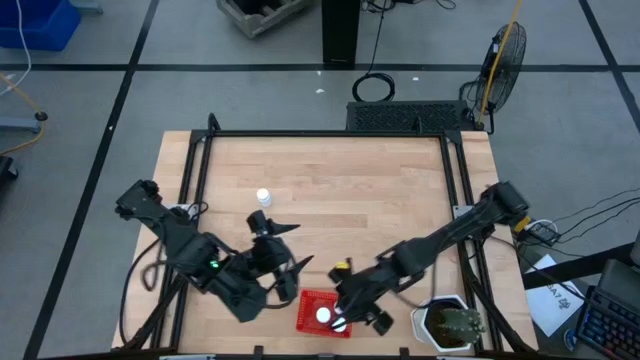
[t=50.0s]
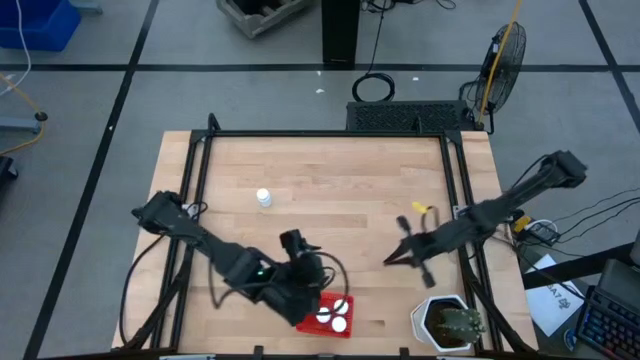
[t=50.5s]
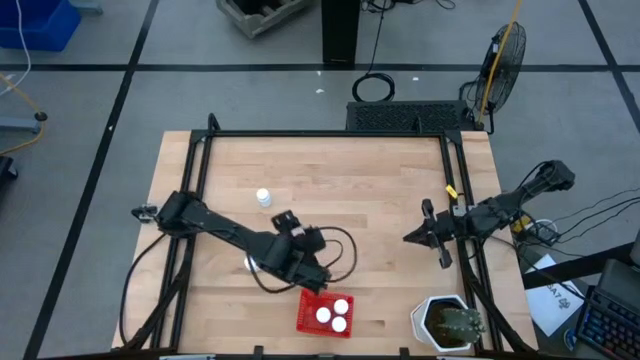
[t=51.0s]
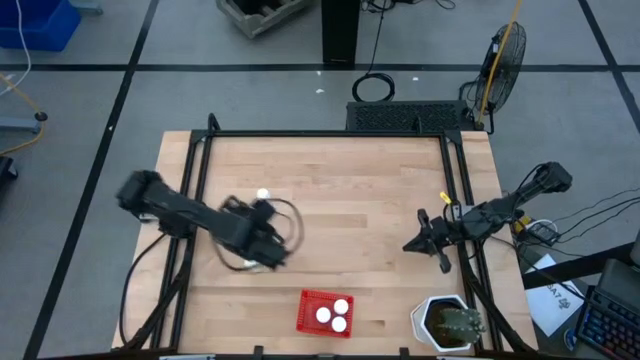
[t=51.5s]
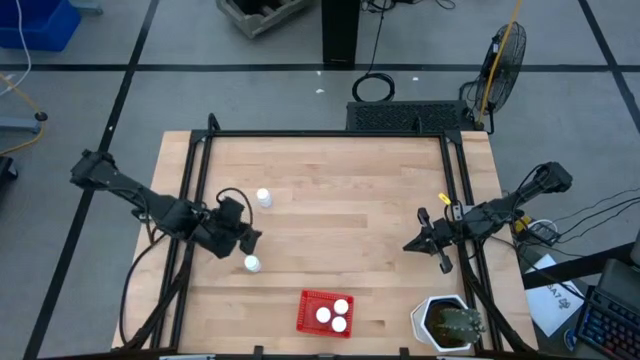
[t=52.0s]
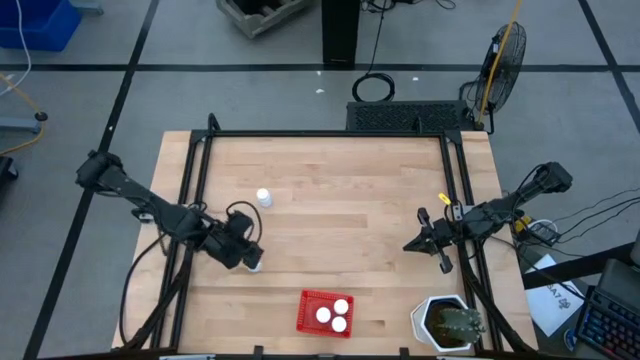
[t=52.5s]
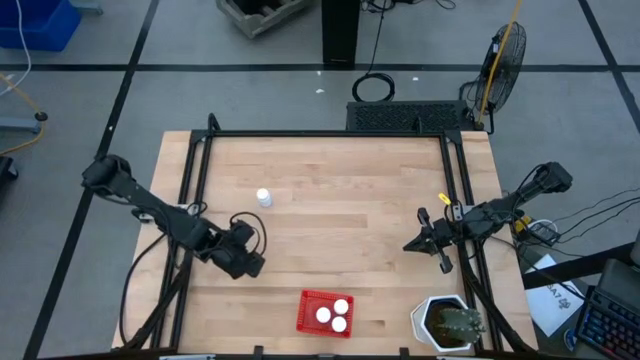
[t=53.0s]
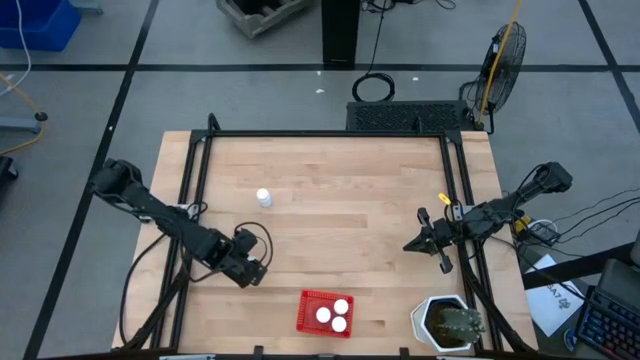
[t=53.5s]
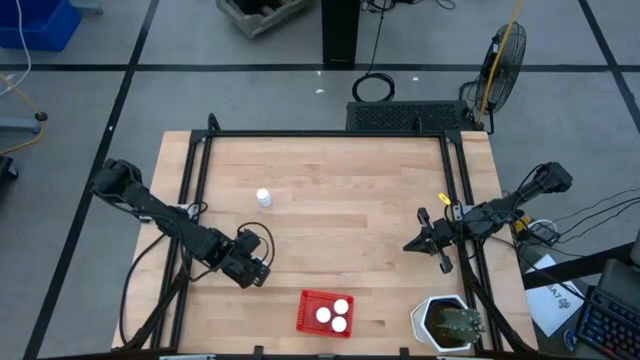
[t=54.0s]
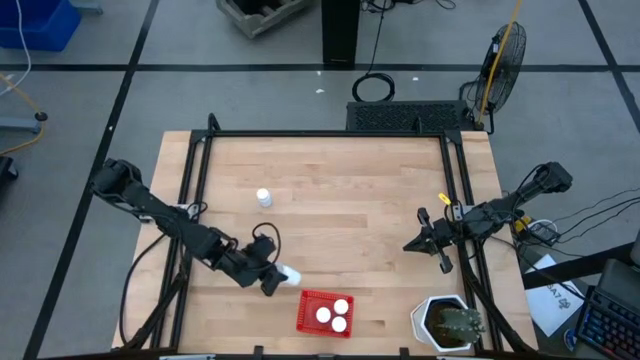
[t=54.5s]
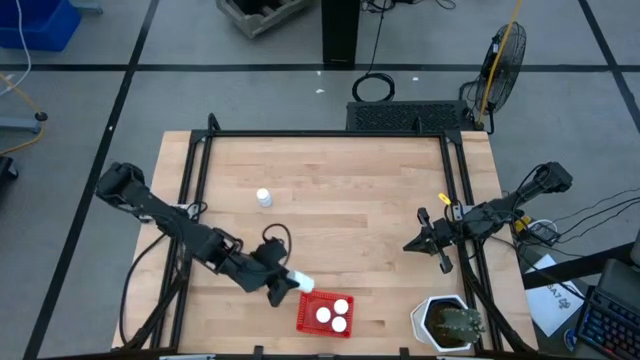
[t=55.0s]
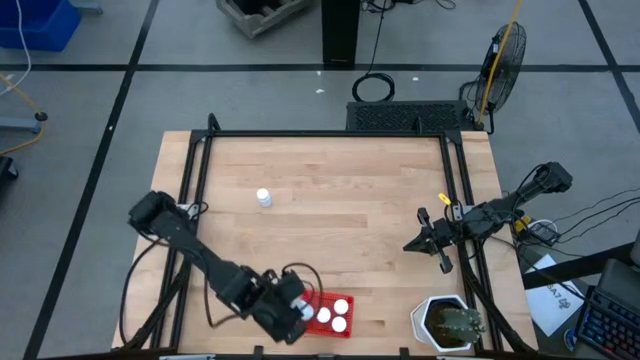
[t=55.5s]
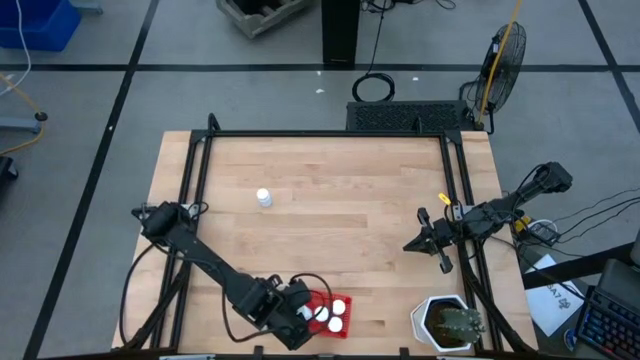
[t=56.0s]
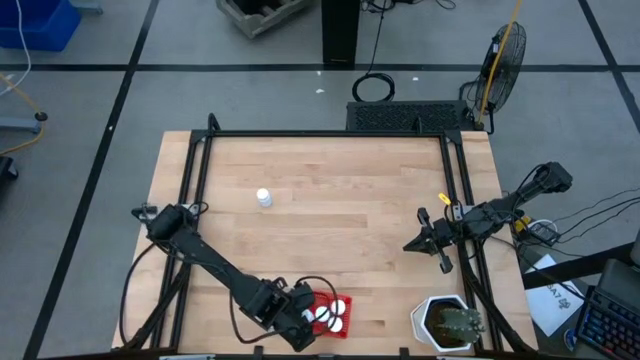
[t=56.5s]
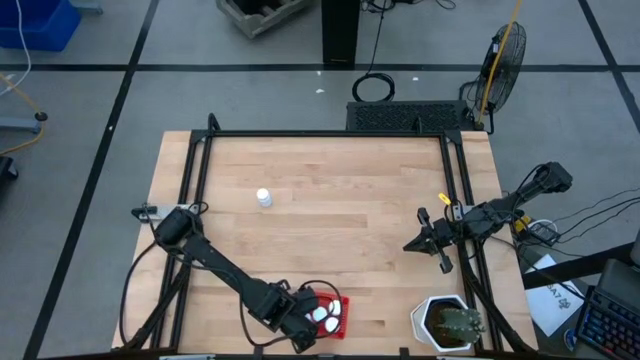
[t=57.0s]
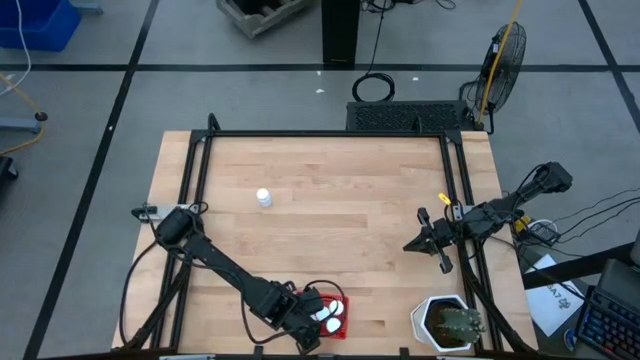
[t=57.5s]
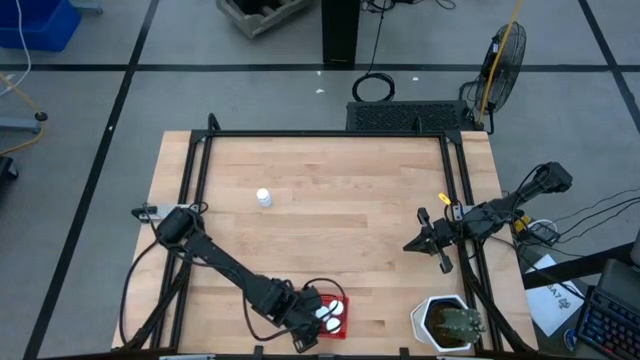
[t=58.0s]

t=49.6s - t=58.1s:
Task: Pick and place pill bottles into a basket
Put the white pill bottle into the red basket

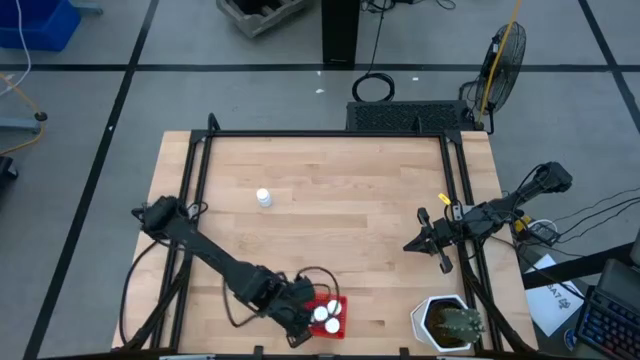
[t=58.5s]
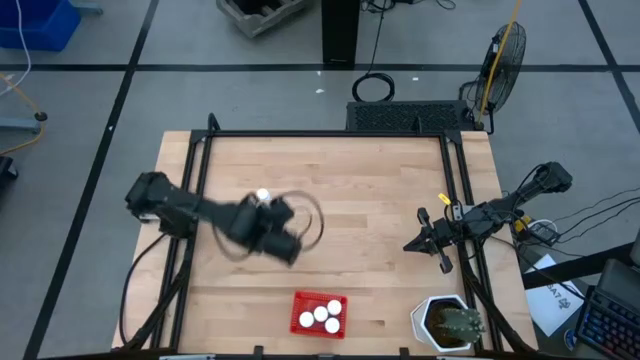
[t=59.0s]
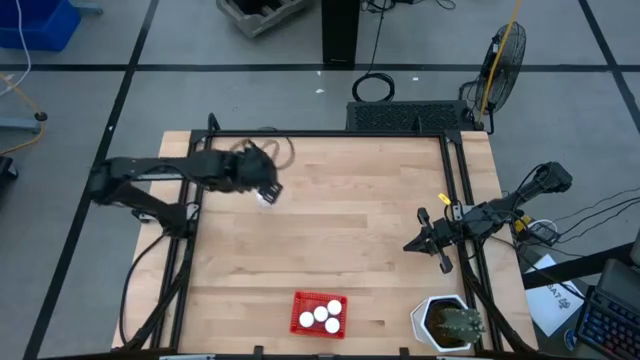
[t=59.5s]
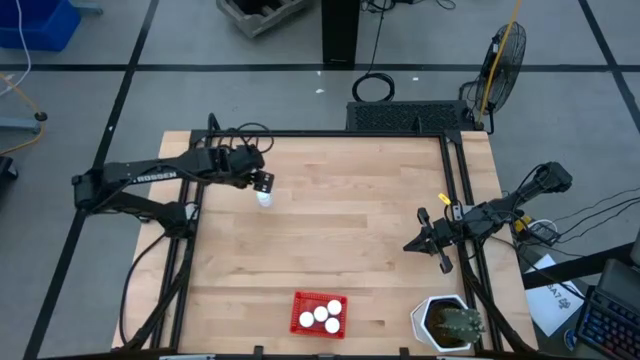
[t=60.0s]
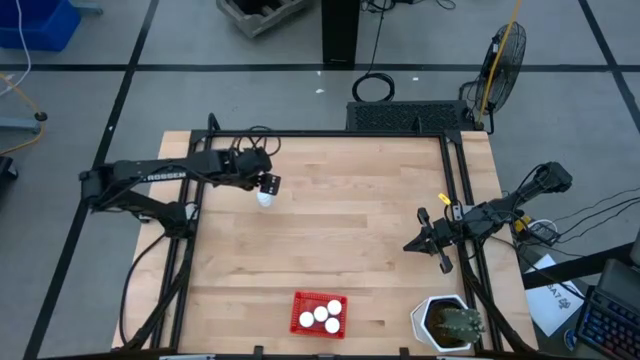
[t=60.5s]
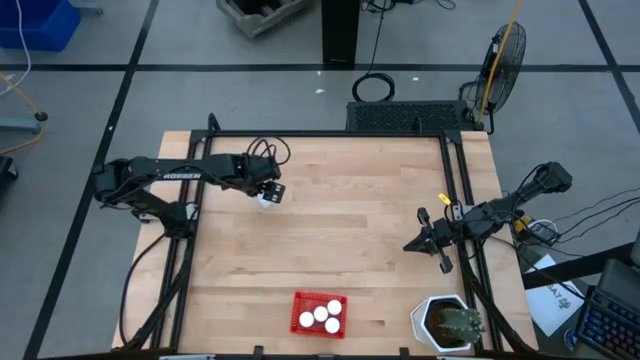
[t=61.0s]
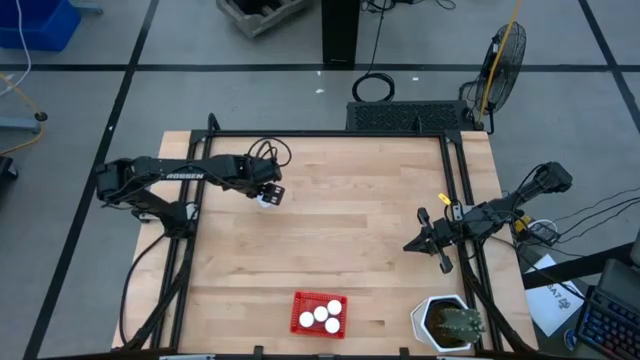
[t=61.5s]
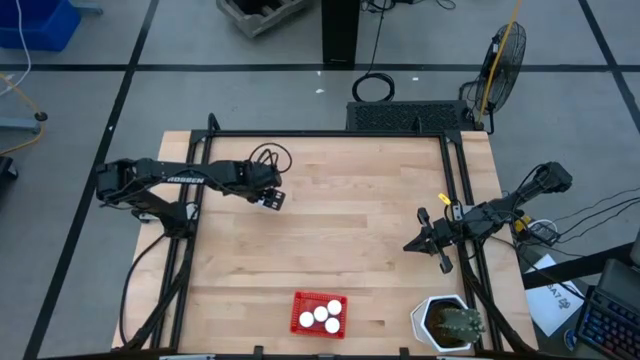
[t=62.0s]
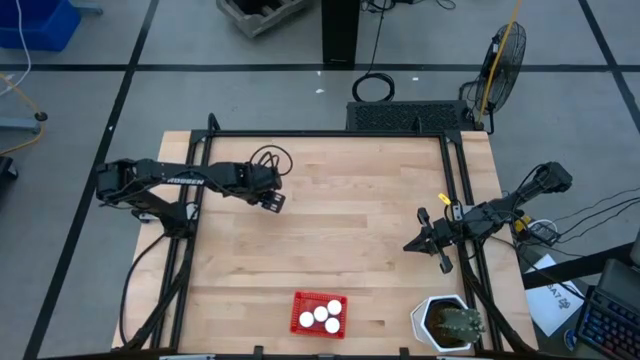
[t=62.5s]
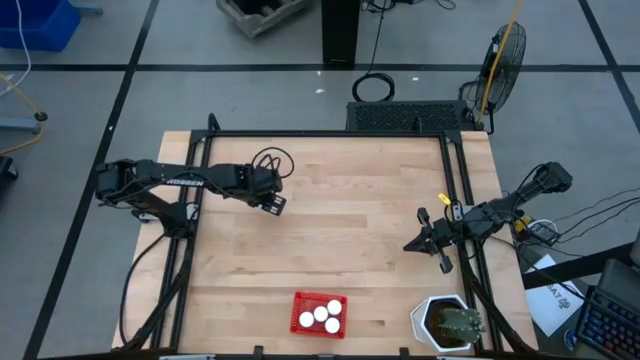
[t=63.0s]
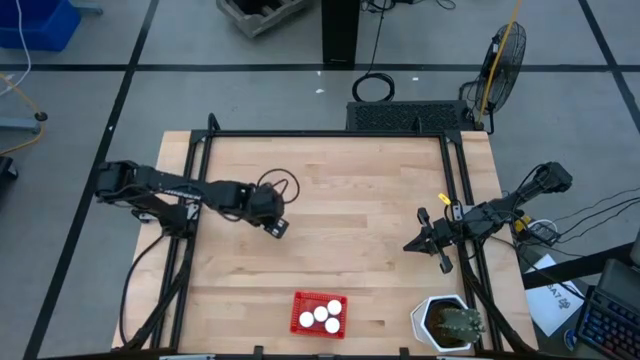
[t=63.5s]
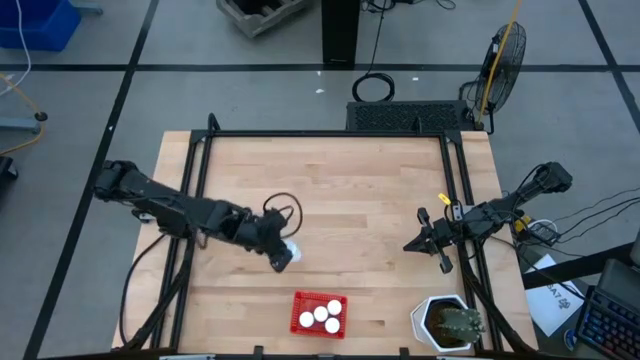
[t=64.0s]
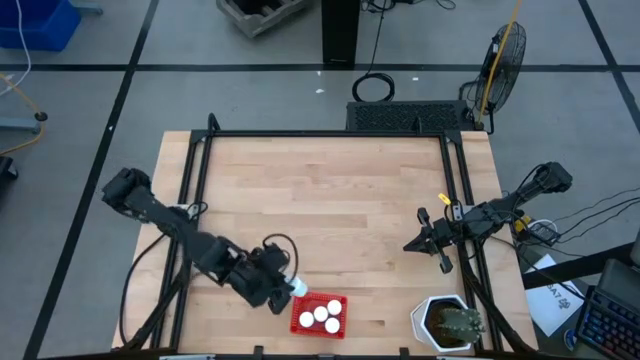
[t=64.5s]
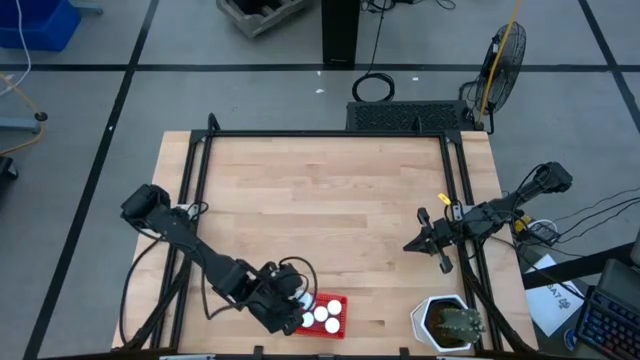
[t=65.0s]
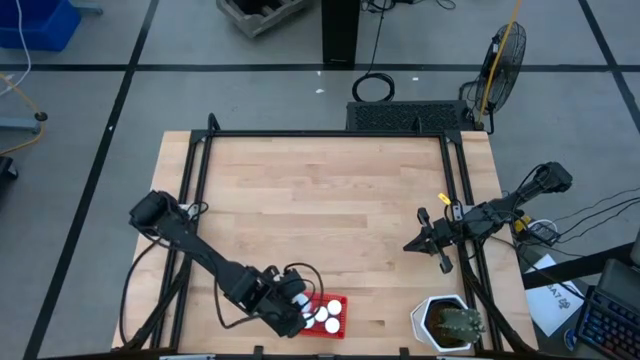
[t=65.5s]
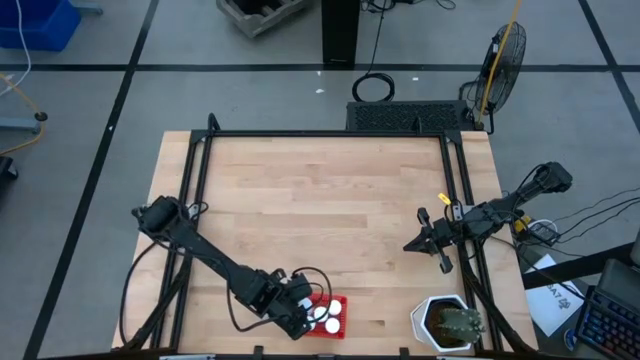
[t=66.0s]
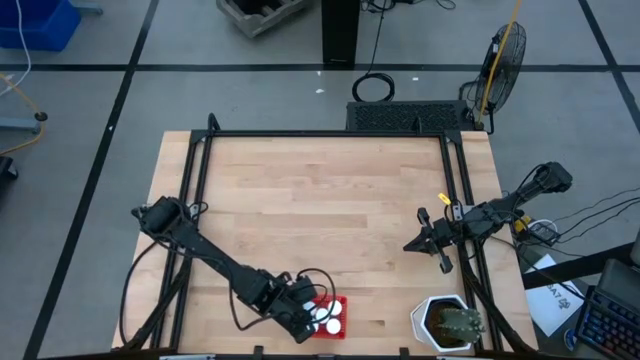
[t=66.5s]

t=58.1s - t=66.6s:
Put the white pill bottle into the red basket

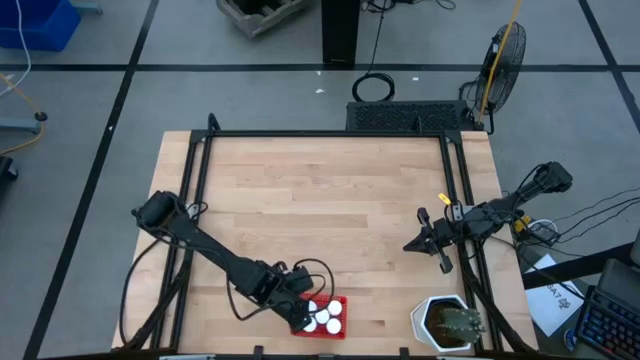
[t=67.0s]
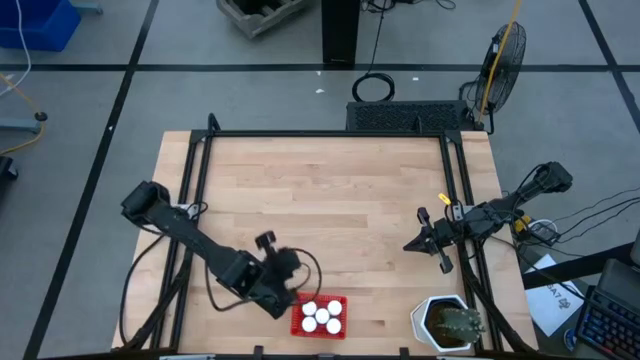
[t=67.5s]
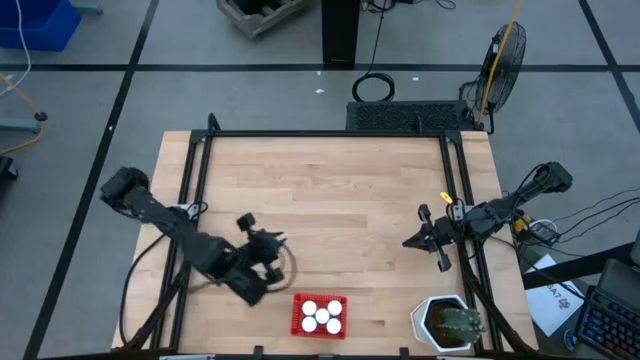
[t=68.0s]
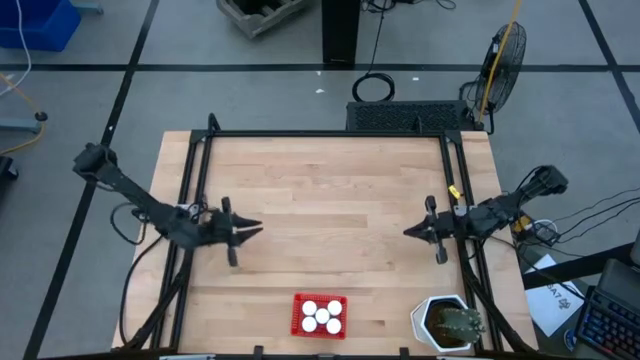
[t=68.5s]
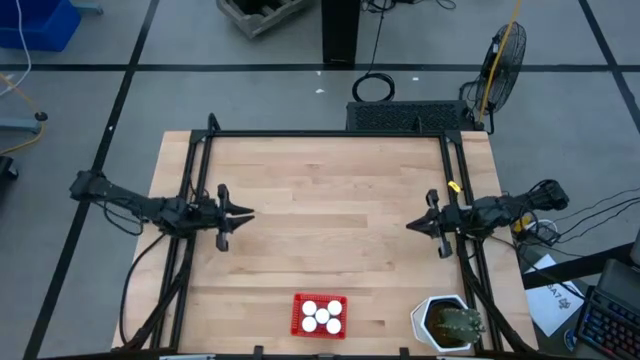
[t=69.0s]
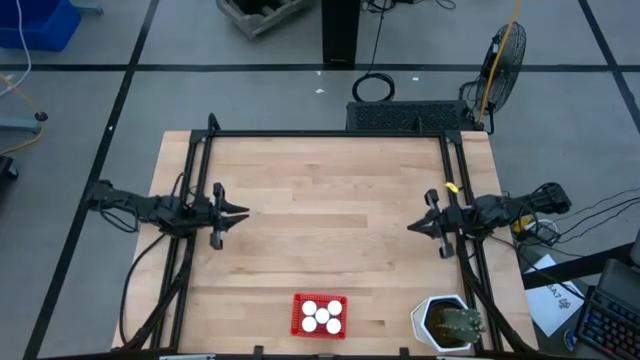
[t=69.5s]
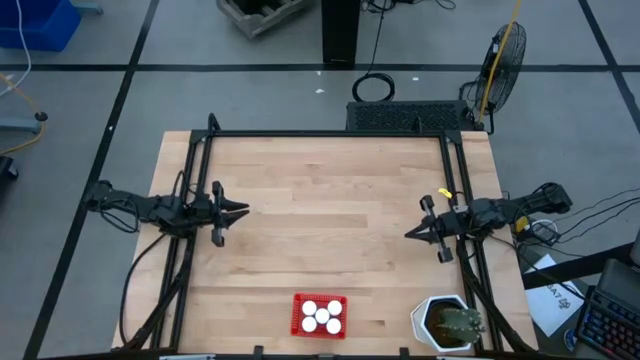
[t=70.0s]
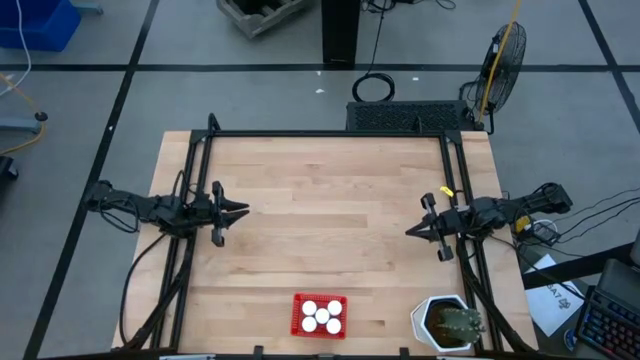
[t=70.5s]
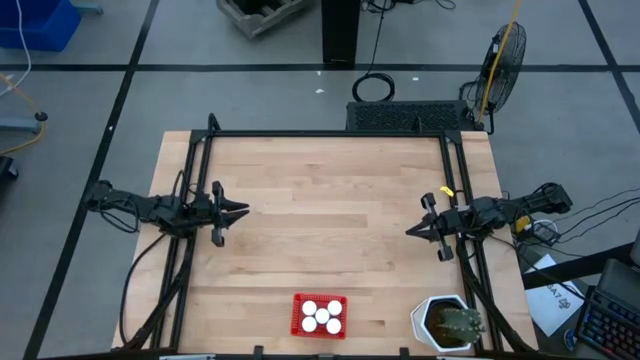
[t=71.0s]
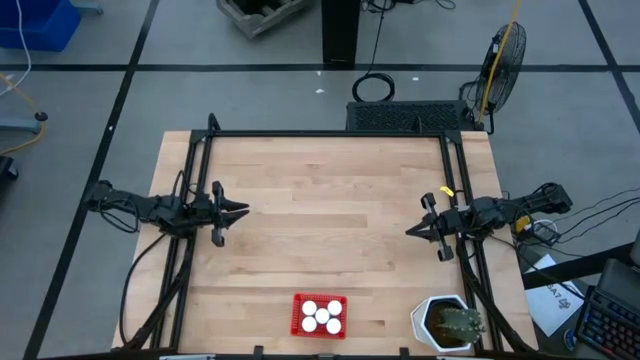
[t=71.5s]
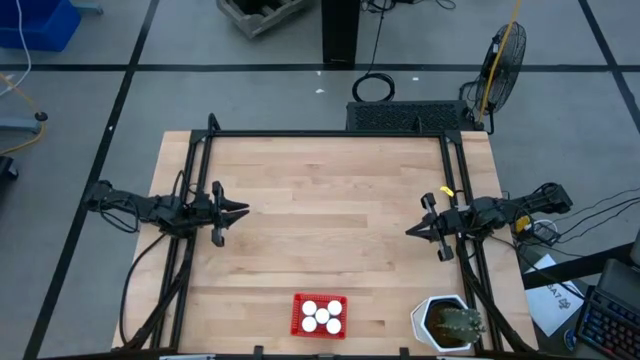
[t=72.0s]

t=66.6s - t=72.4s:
Return to Home Position
